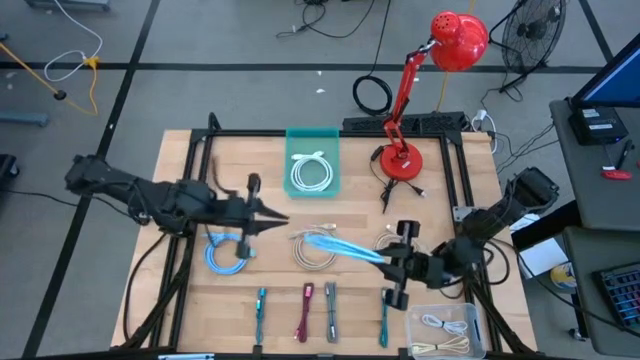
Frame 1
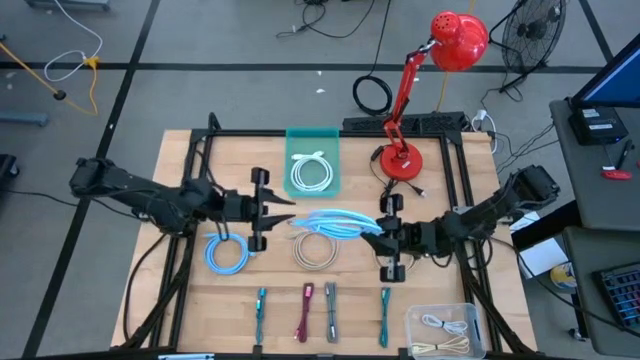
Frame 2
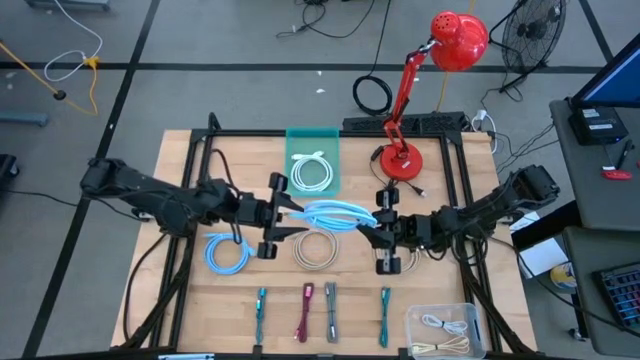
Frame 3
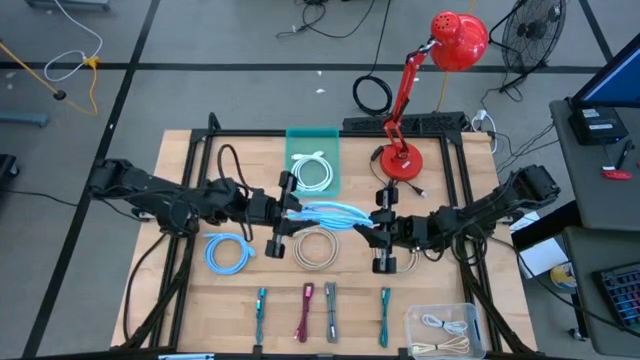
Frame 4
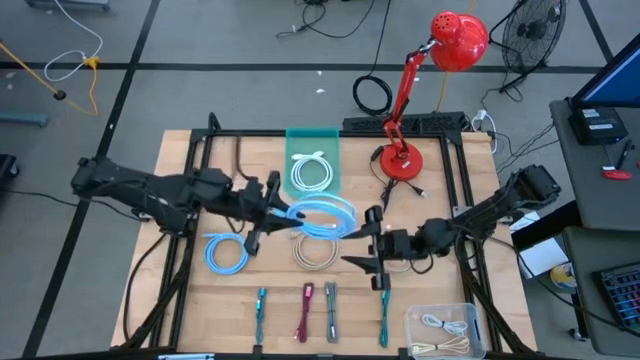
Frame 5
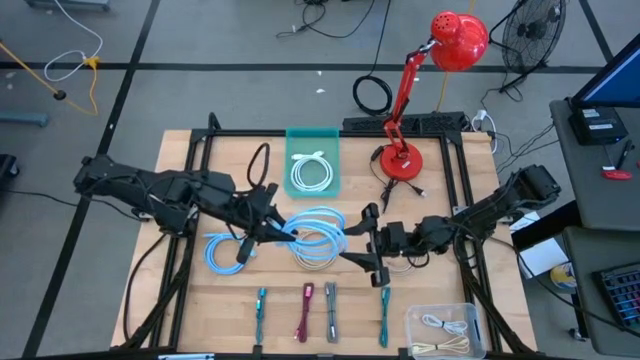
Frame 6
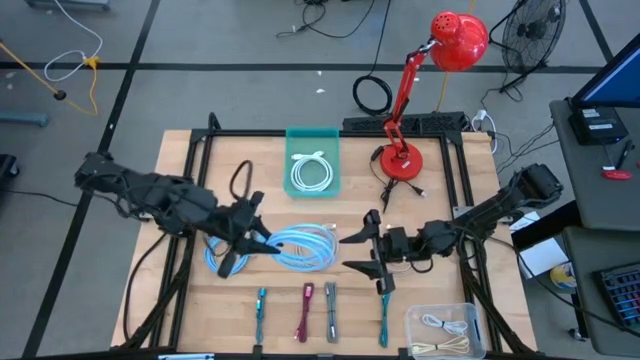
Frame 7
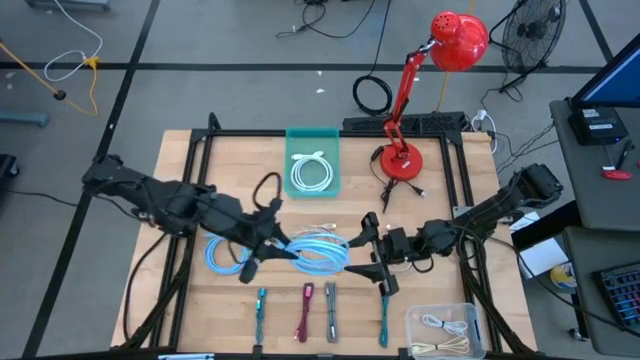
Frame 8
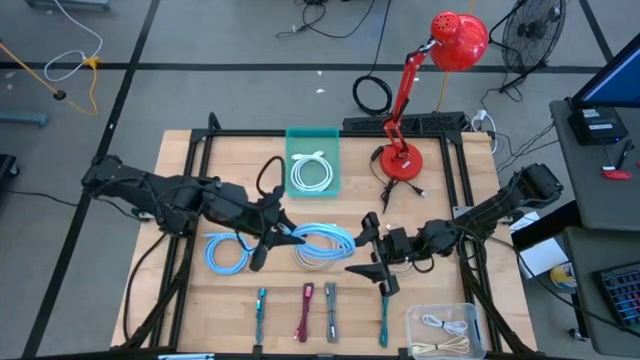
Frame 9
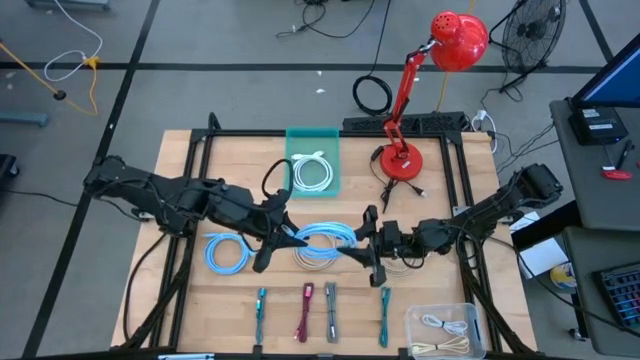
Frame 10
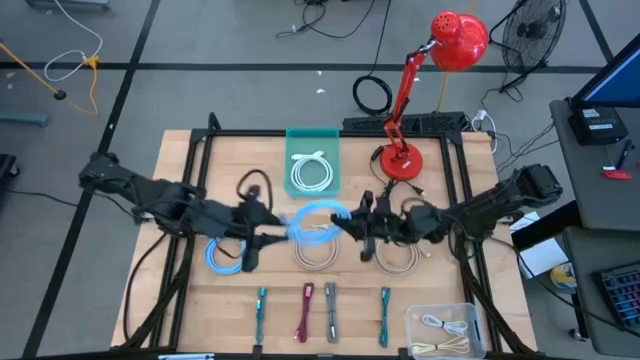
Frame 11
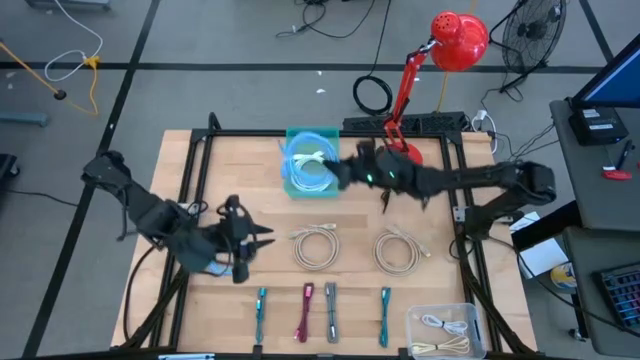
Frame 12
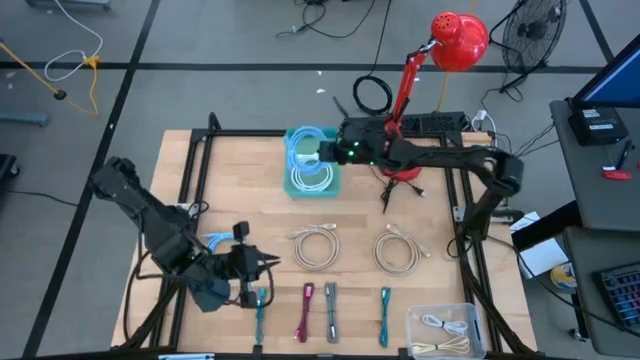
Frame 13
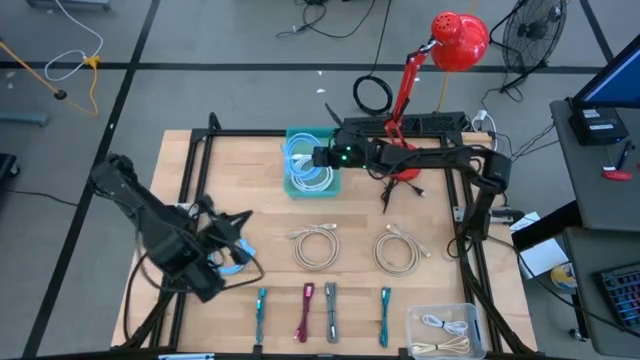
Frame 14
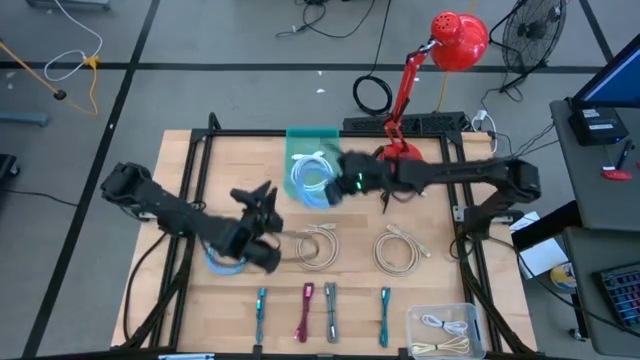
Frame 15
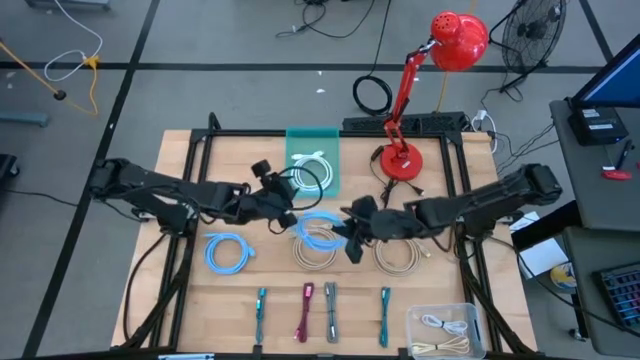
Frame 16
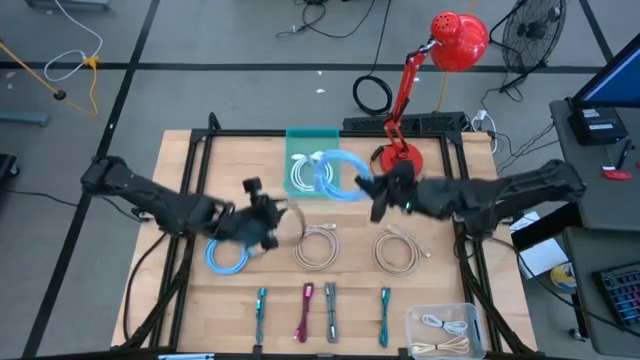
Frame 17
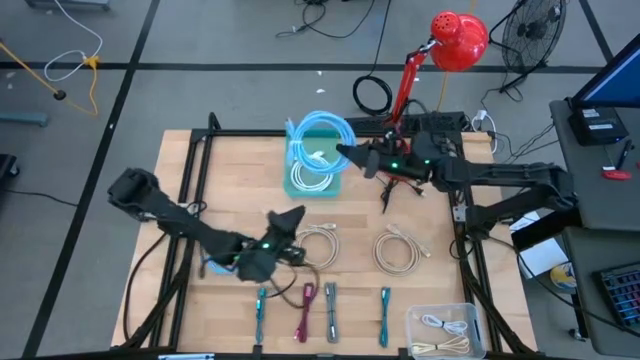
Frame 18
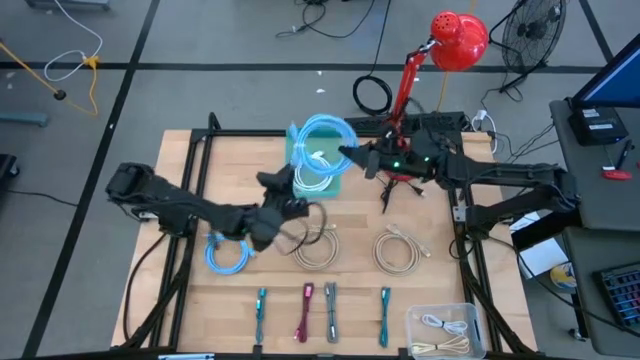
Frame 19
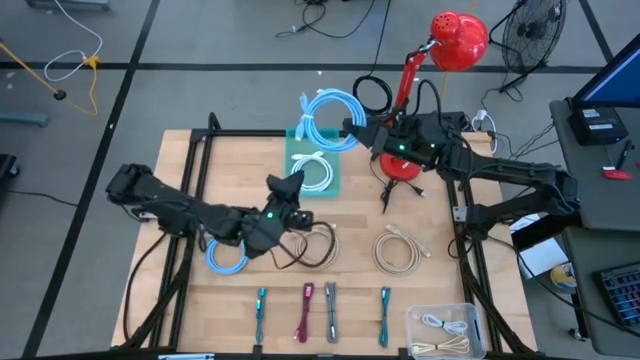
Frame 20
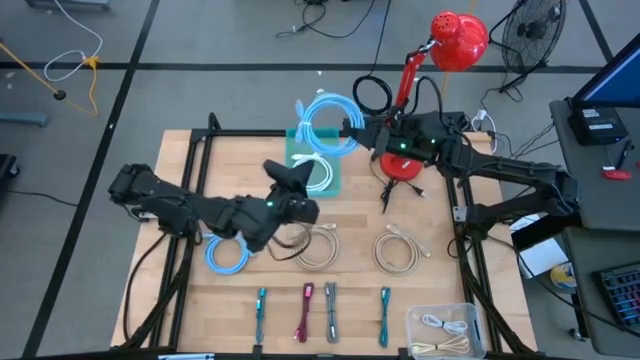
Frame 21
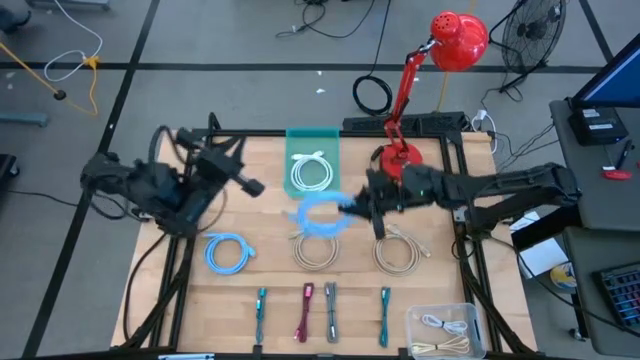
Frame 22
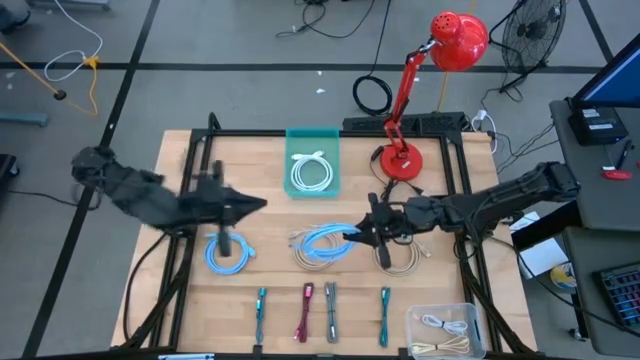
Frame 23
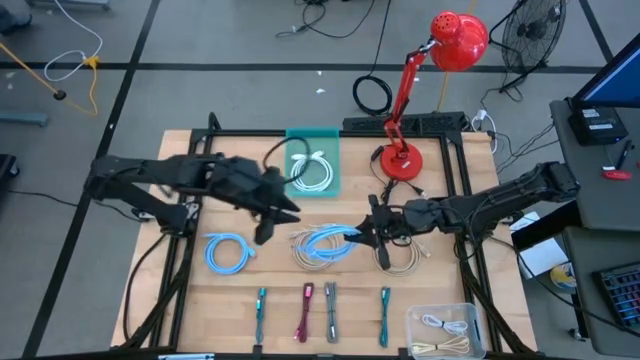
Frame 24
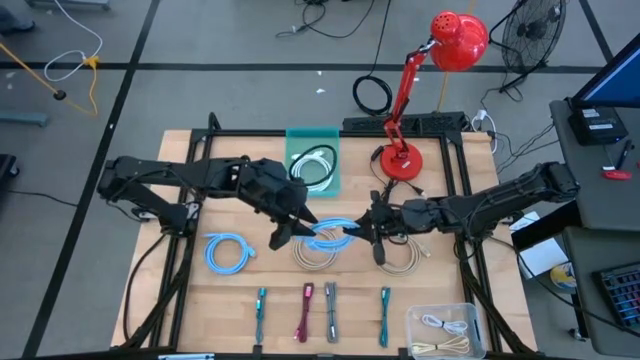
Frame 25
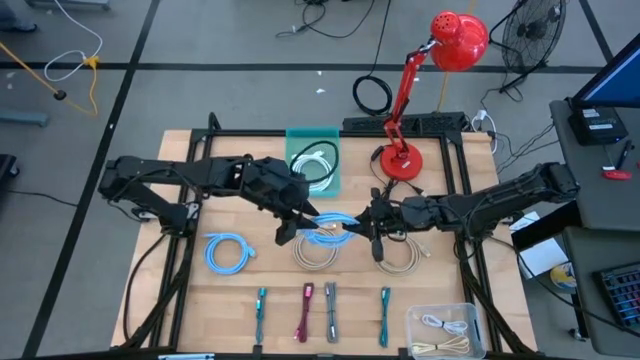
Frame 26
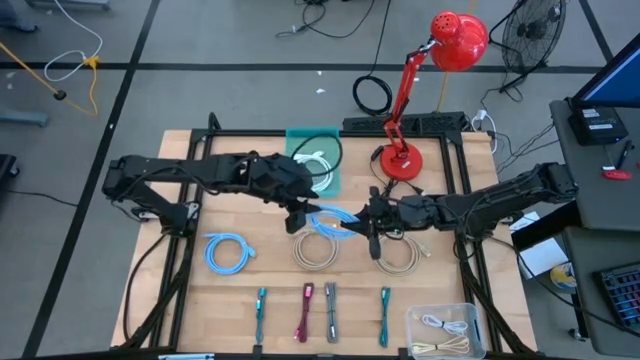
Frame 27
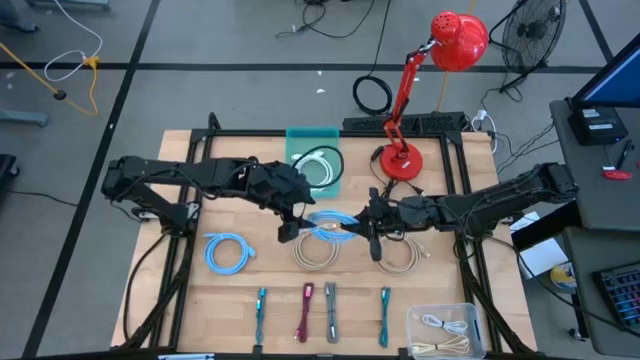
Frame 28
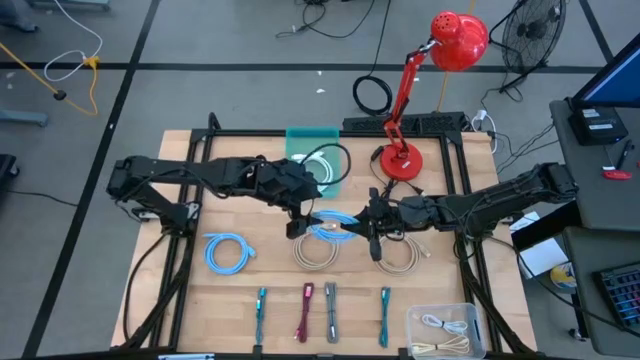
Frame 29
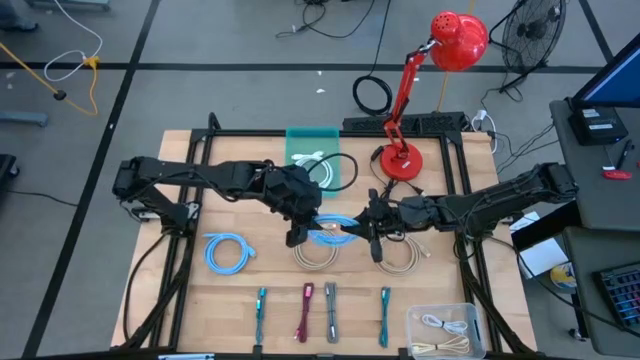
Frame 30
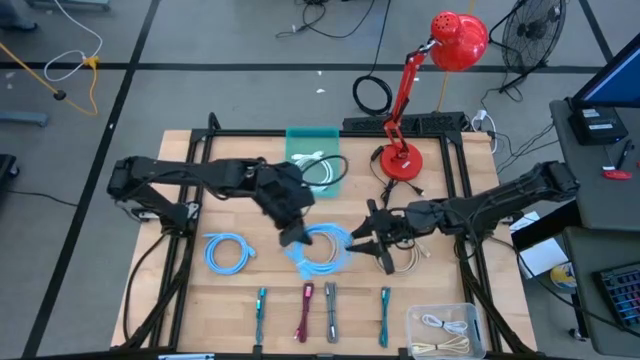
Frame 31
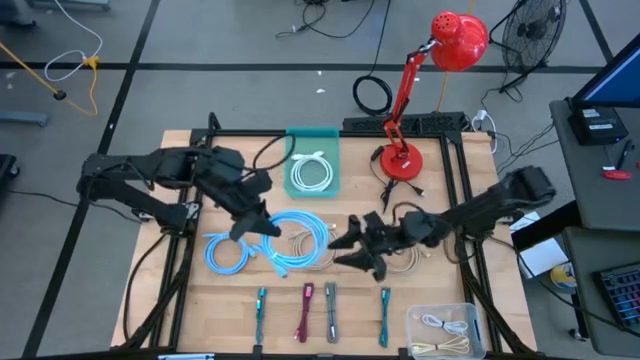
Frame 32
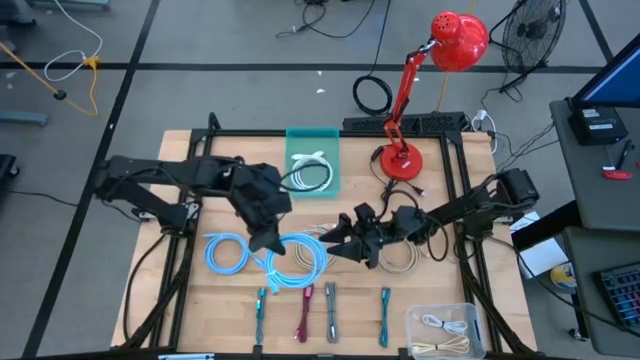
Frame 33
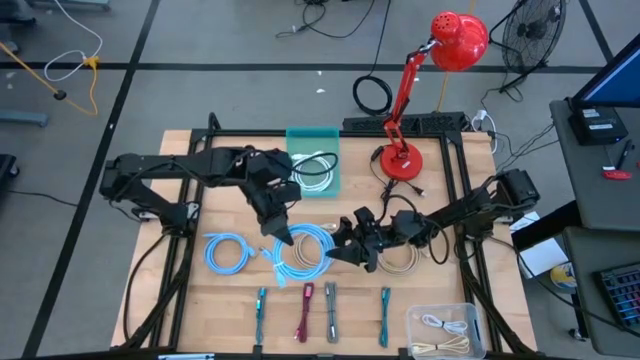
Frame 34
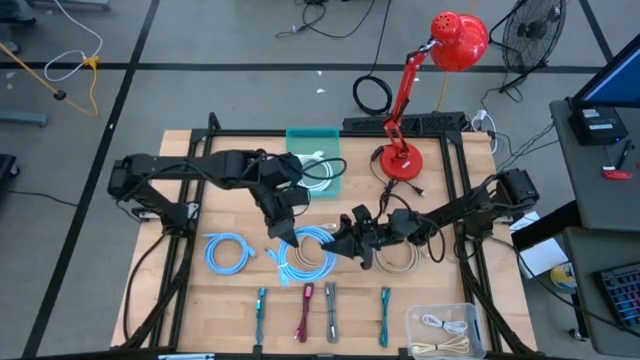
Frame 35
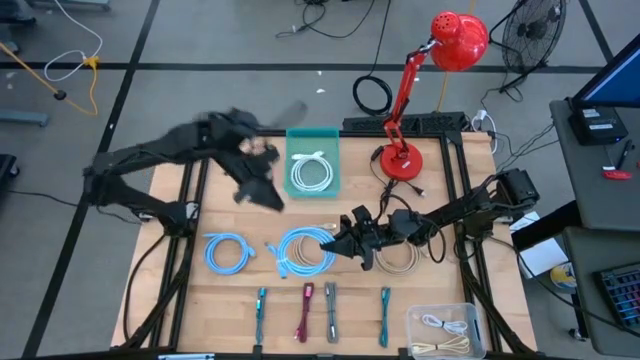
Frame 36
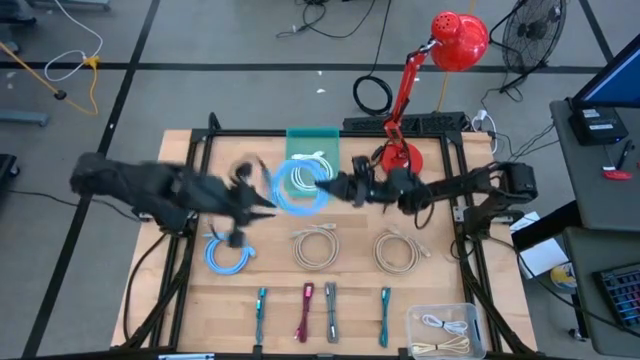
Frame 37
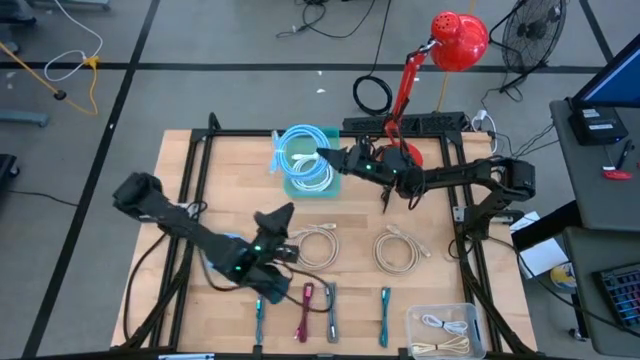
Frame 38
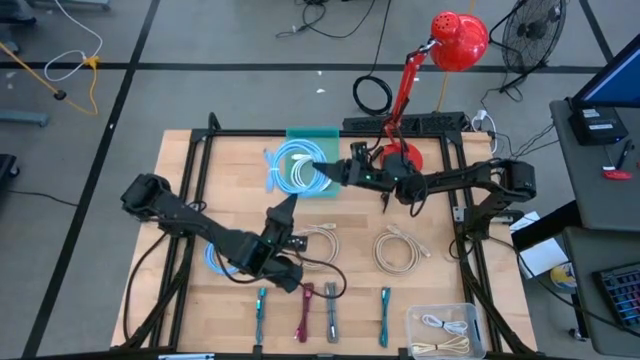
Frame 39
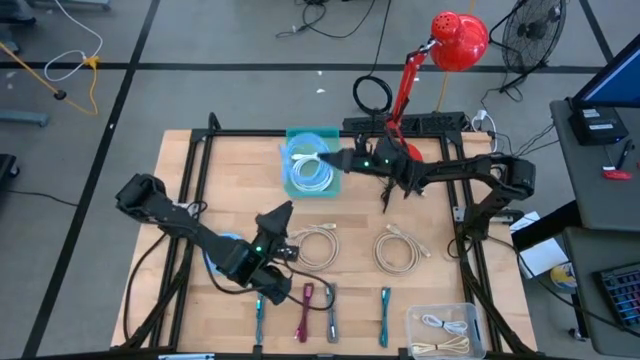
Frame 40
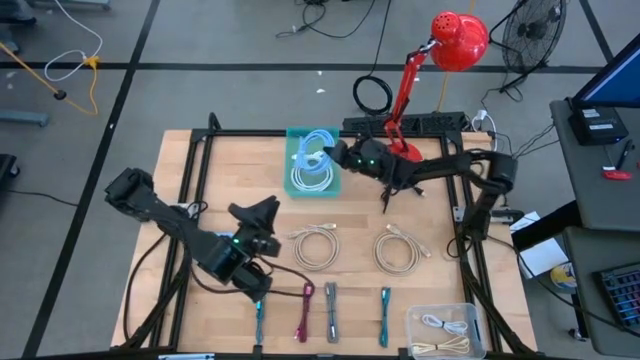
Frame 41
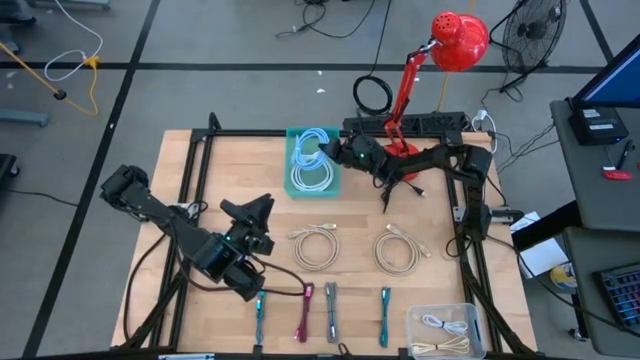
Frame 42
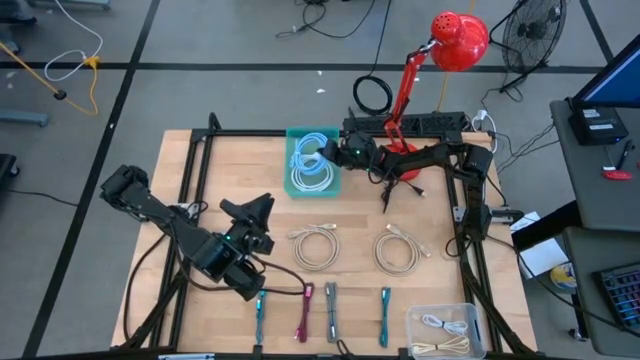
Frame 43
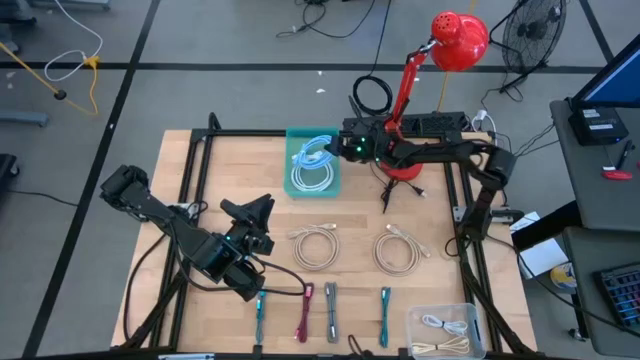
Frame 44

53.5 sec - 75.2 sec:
Task: Pick & Place USB Port
Put the right blue HDMI cable into the green bin
